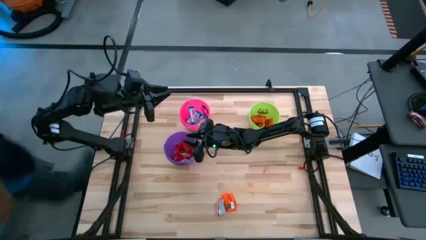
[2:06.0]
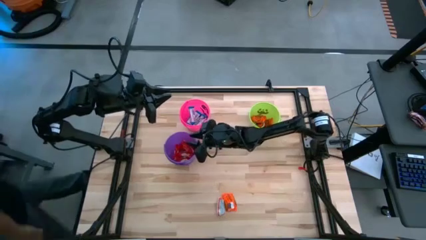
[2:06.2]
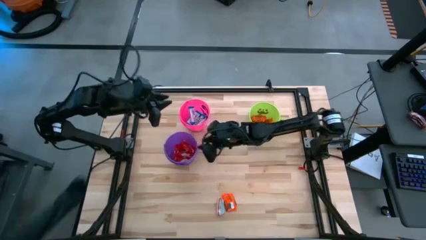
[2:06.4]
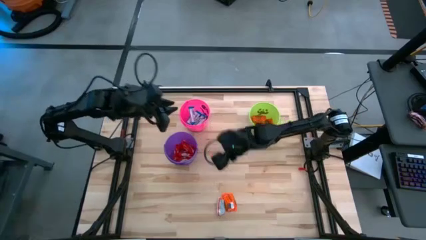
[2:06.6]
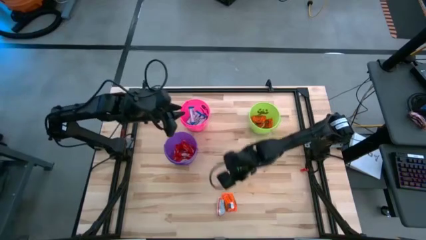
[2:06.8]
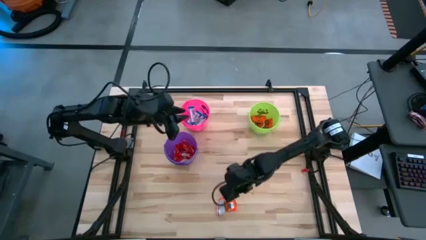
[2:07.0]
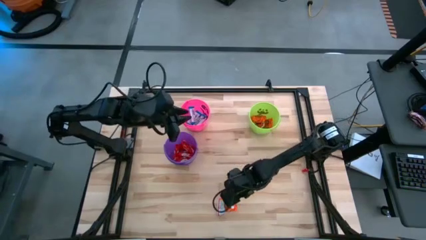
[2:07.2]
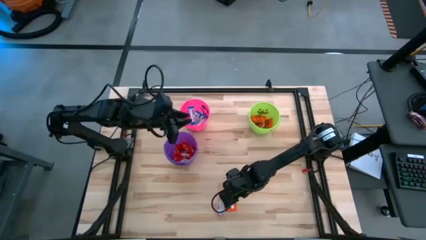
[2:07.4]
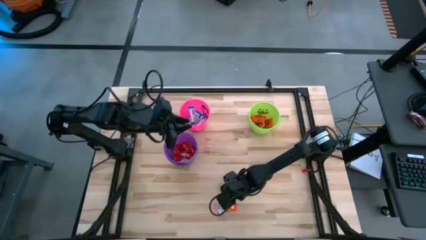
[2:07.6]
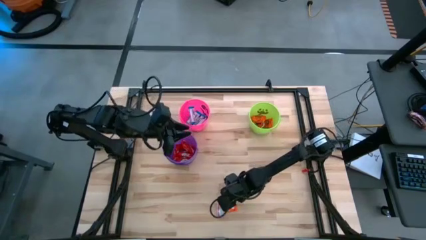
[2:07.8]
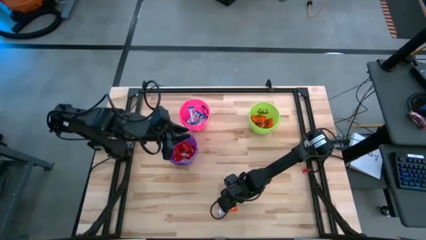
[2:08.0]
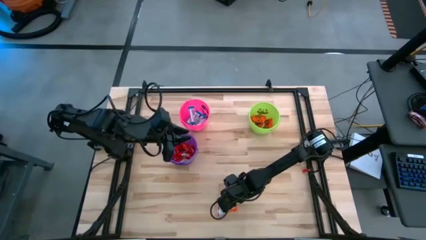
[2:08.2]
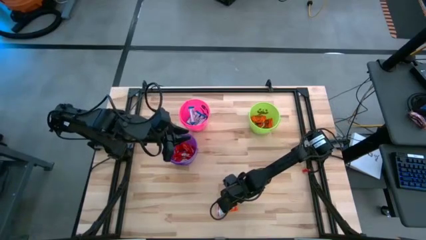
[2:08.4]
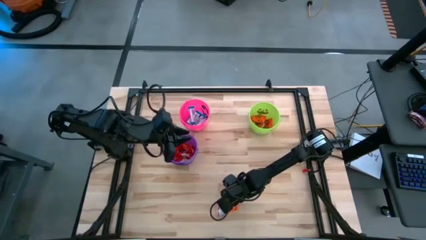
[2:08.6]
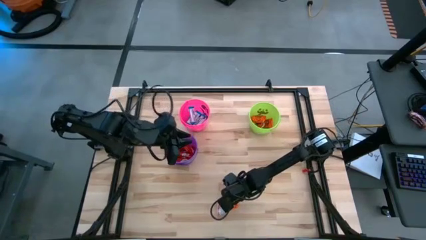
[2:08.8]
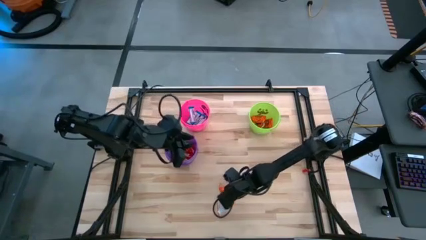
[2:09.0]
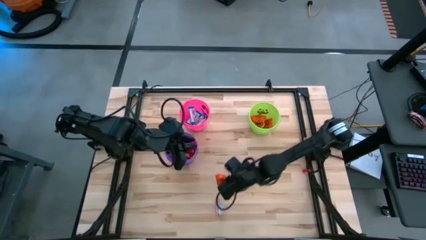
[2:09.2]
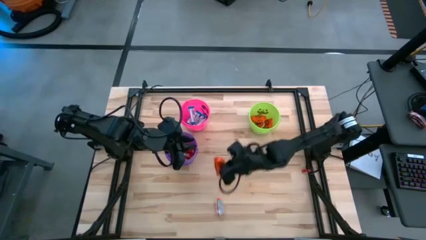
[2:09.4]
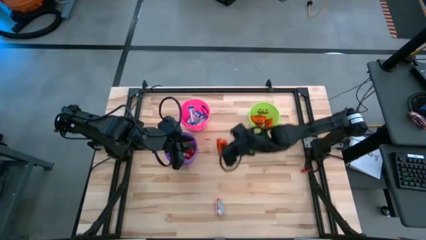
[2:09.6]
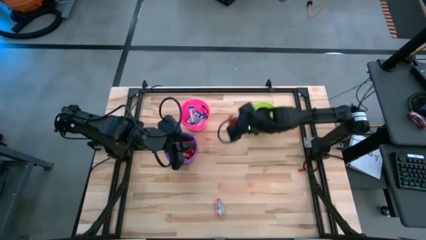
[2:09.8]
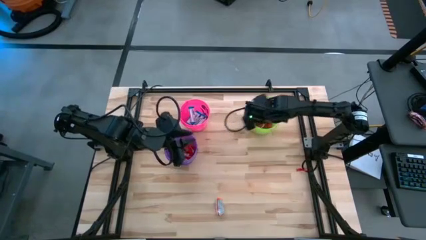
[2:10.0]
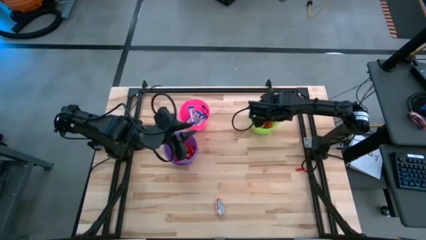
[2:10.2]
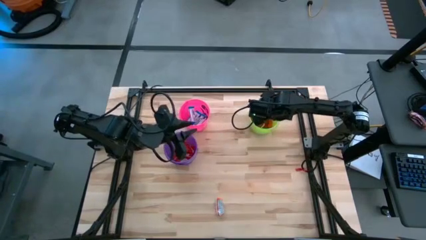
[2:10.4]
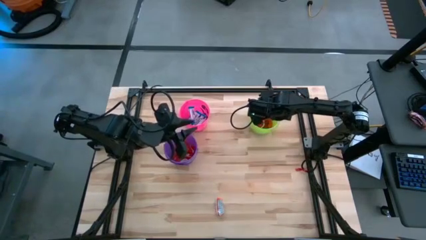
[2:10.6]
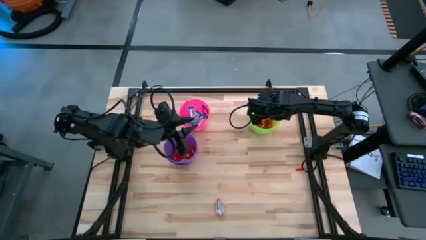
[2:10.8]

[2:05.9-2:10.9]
Task: Sort candy
Put the orange chocolate into the green bucket

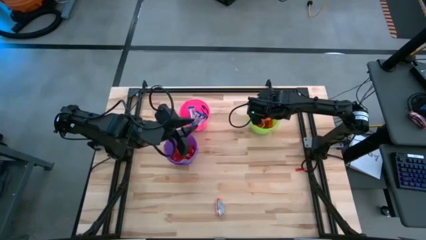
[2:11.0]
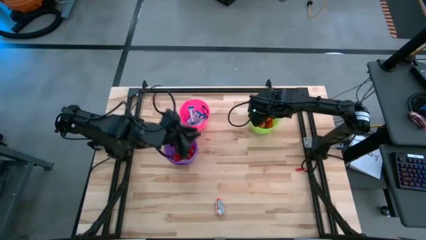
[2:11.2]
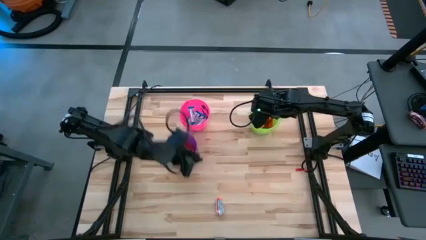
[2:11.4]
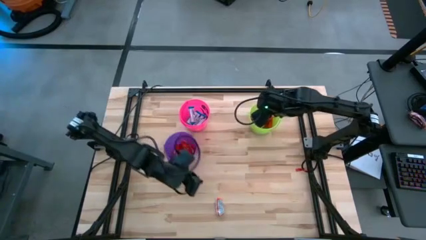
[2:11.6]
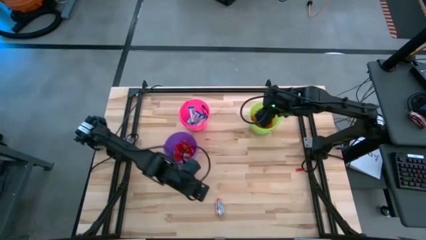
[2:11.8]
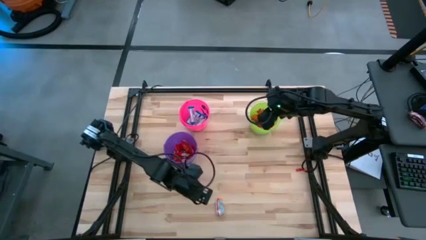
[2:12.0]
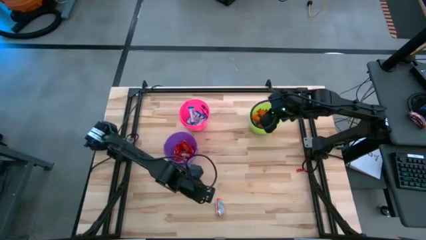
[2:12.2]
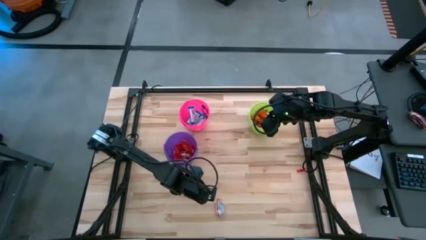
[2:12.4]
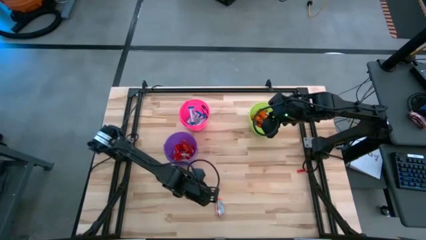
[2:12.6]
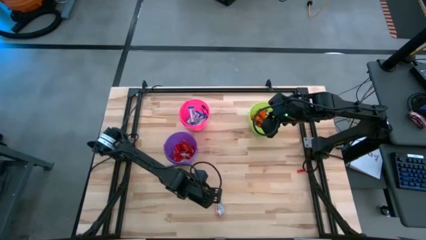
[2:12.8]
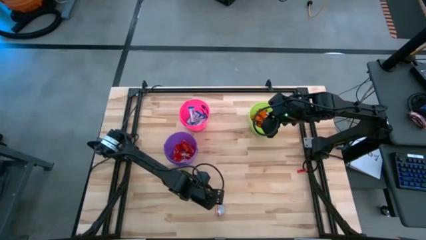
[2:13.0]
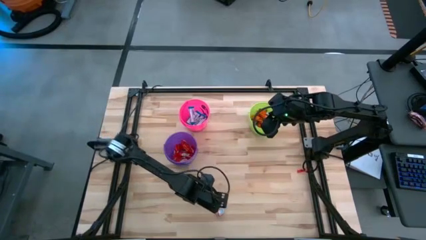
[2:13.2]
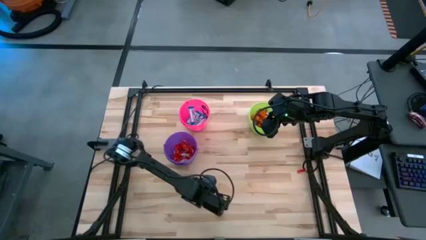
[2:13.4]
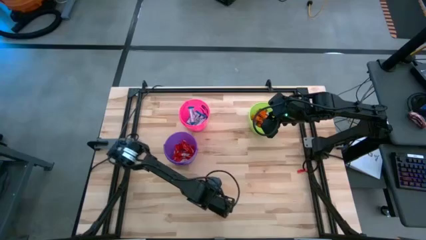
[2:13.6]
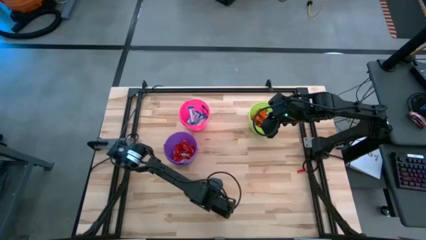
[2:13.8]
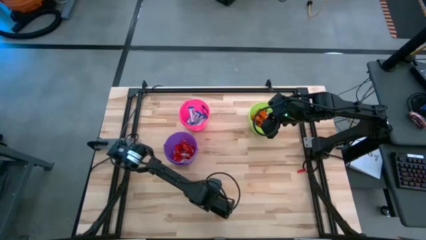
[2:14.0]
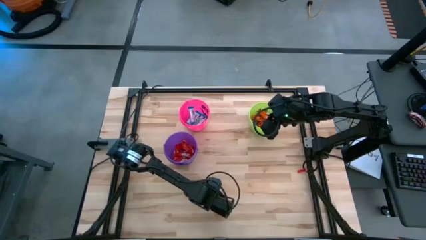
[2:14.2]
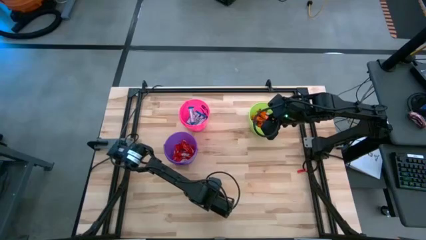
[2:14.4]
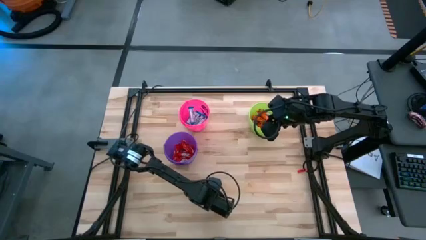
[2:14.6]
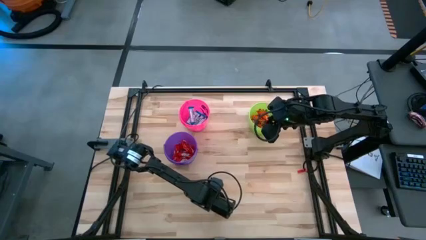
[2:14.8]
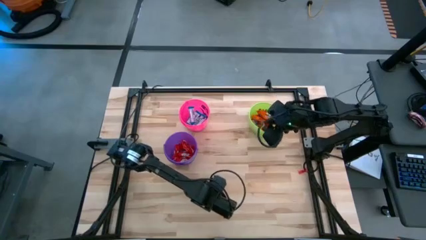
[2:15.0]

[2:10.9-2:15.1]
Put the orange chocolate into the green bucket

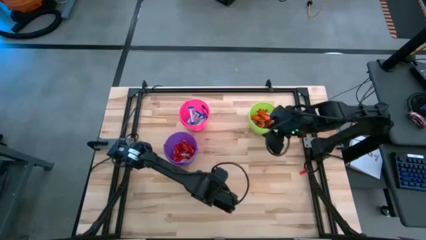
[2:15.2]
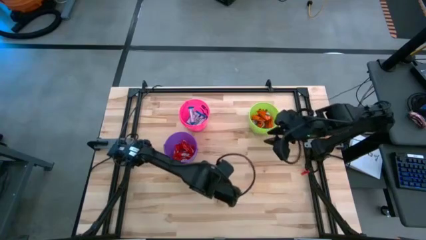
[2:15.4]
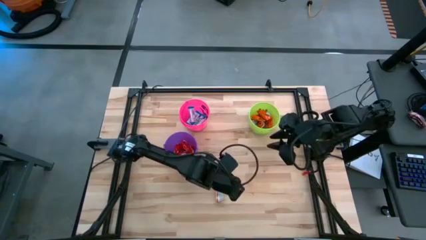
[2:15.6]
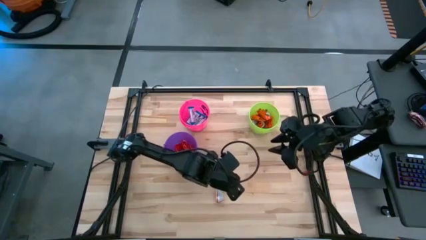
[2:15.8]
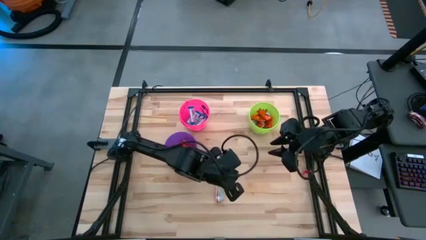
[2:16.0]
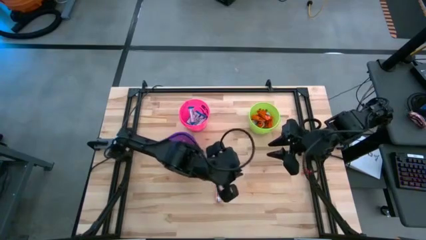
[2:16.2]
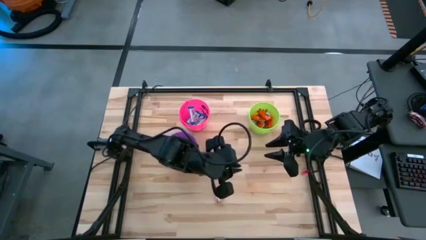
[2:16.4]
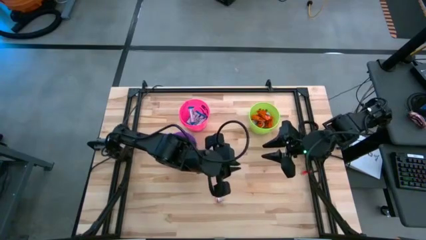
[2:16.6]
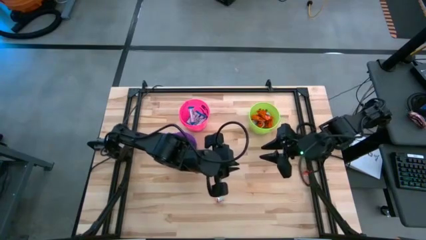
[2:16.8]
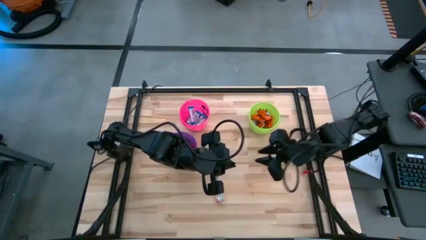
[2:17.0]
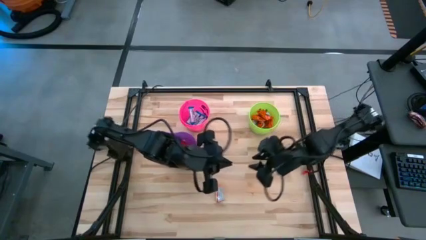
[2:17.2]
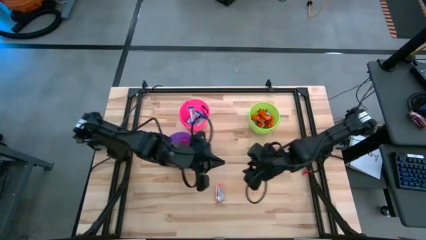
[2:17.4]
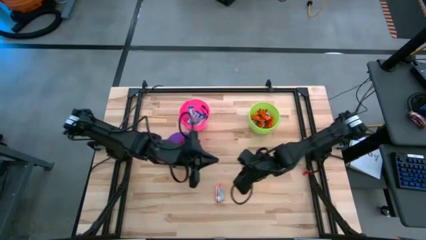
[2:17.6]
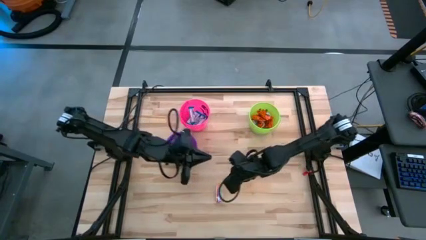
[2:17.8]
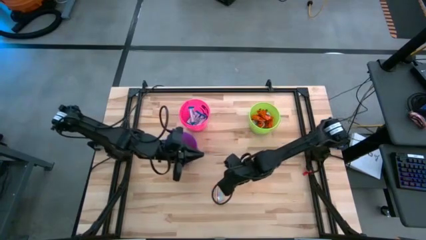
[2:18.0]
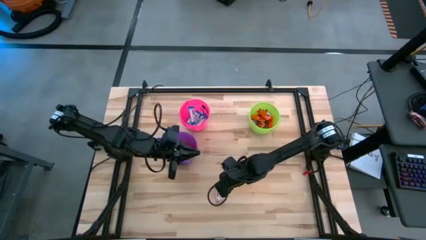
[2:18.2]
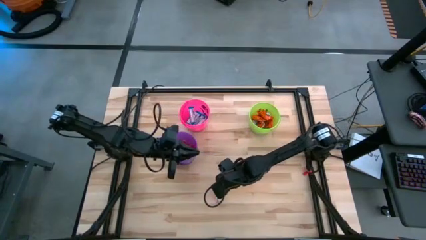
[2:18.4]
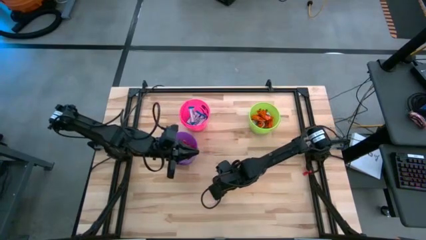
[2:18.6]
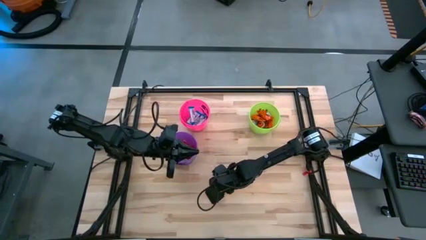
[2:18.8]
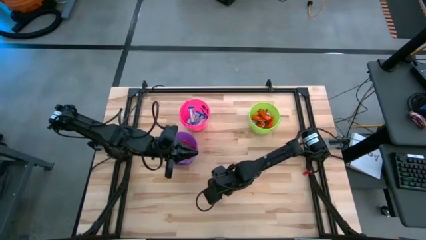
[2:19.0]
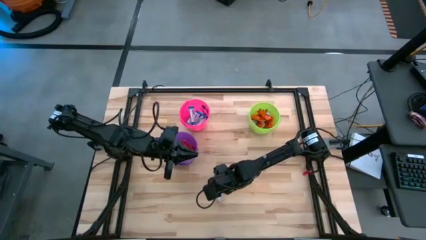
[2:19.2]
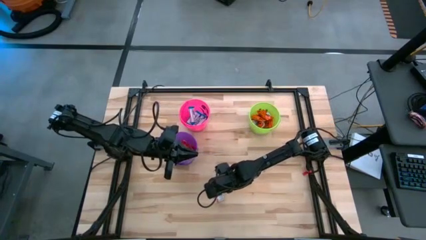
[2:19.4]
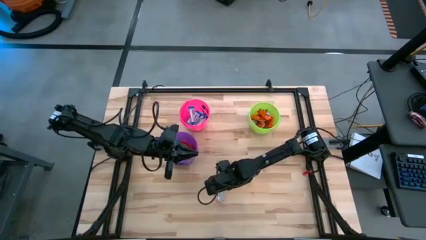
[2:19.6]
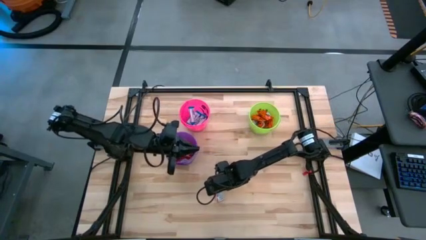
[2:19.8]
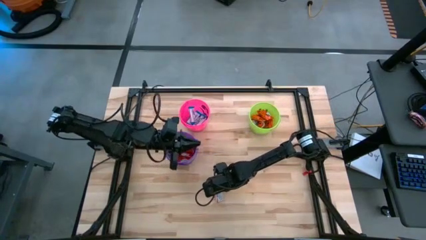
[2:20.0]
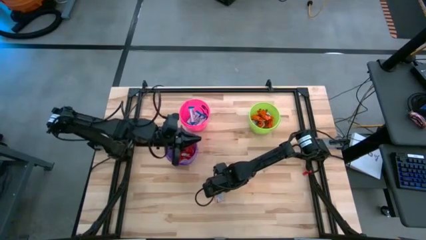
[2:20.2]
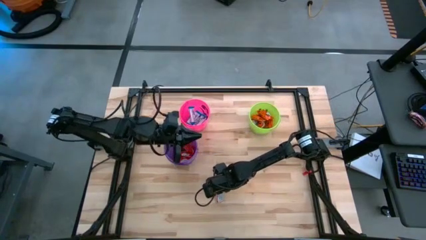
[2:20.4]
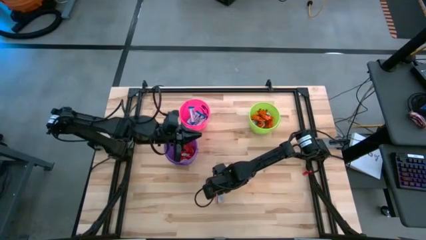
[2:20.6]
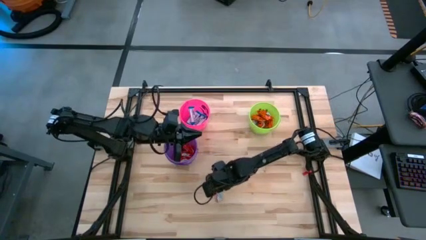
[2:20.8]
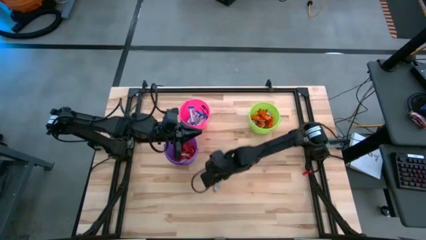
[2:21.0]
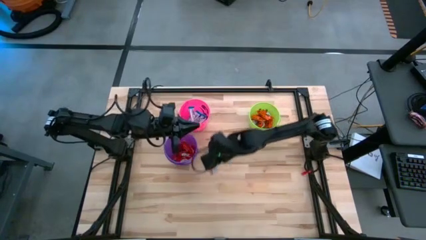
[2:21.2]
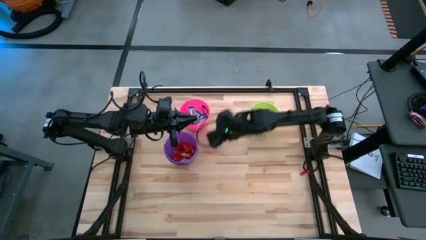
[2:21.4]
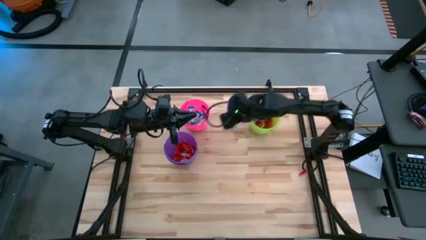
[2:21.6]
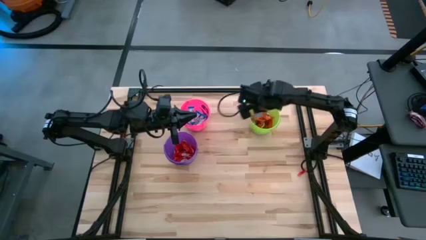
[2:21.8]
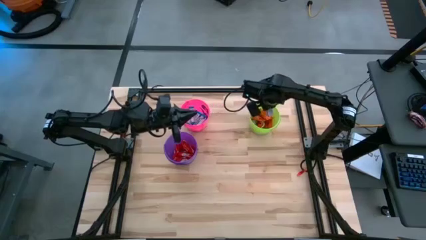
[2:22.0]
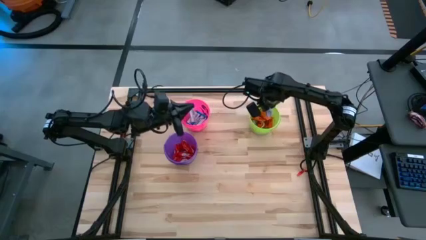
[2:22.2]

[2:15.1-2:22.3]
Put the orange chocolate into the green bucket
